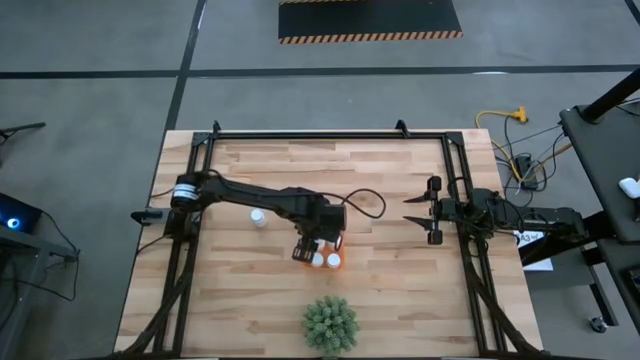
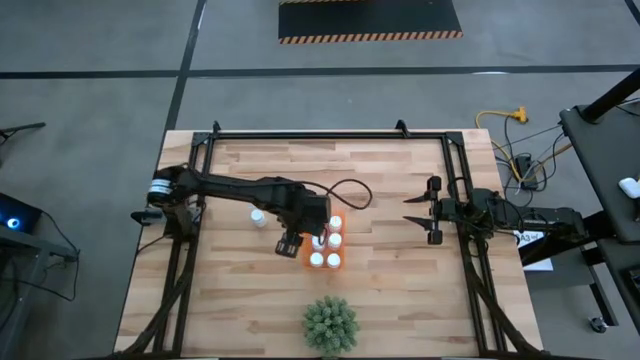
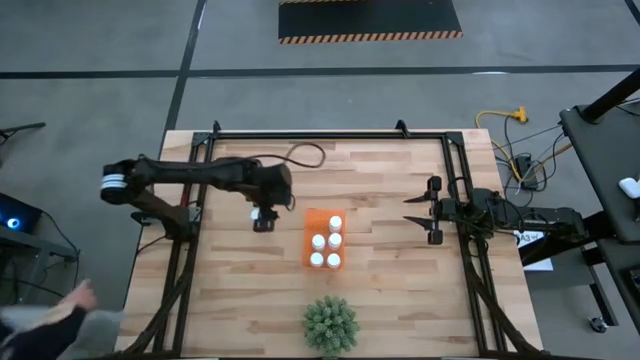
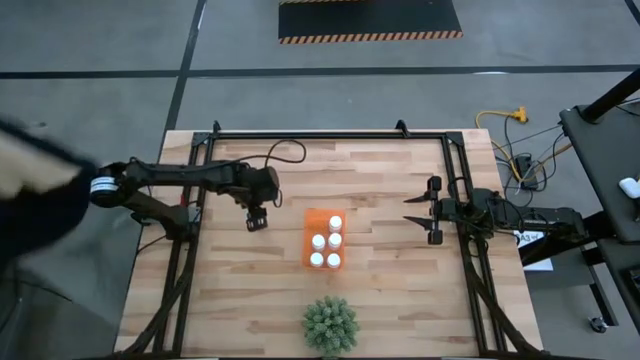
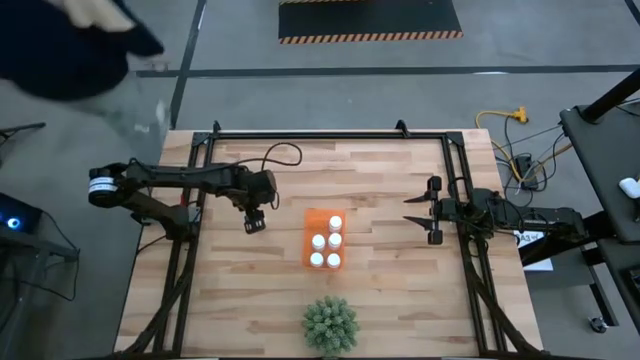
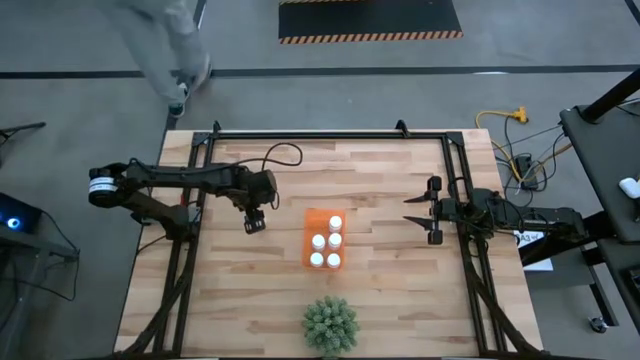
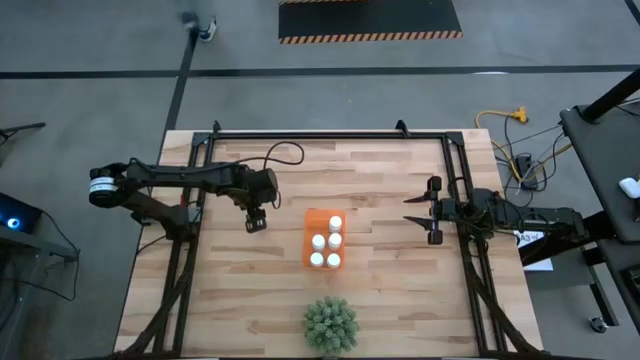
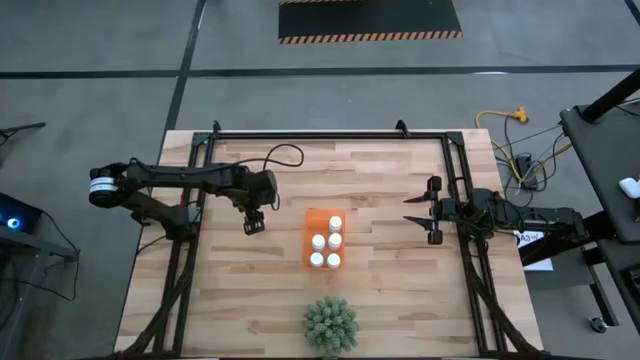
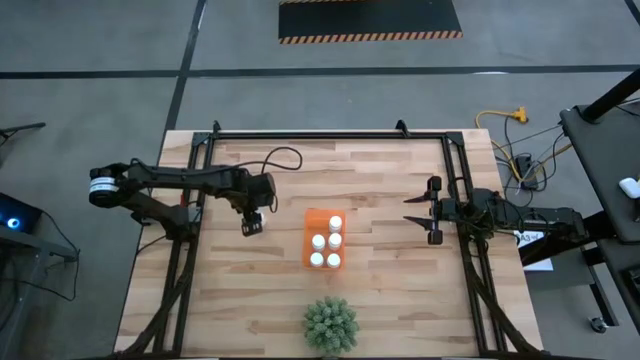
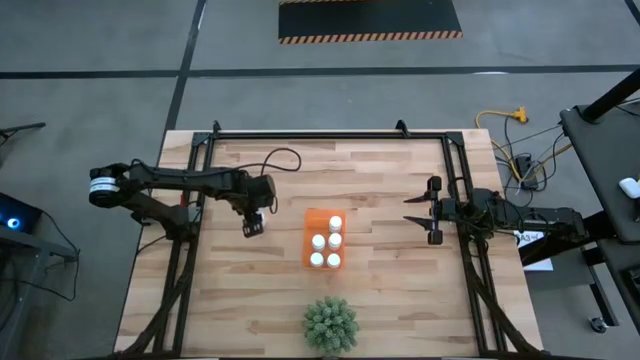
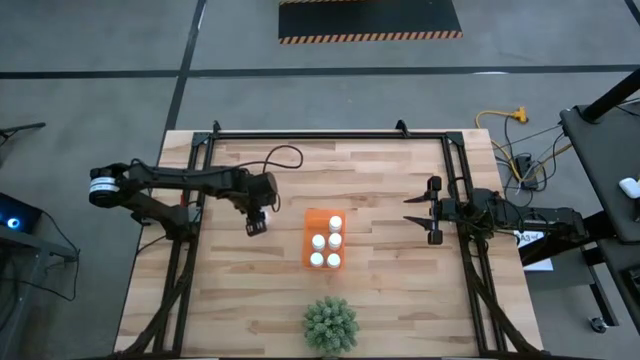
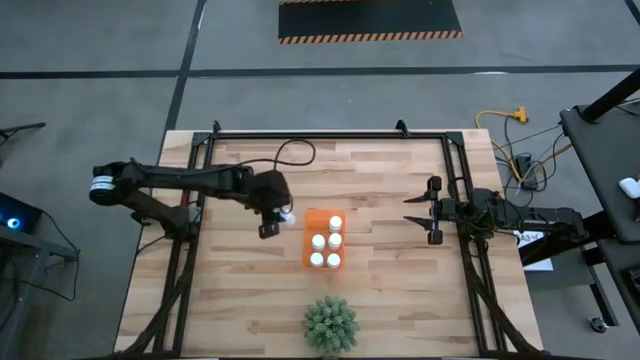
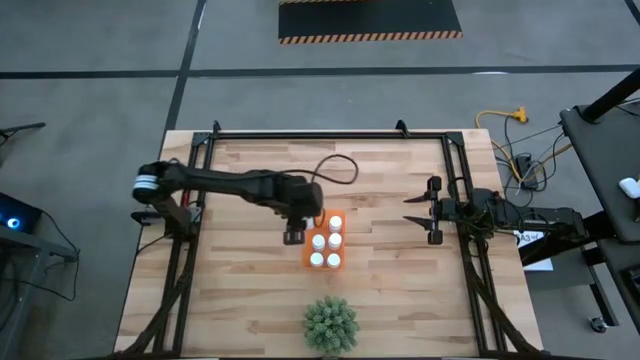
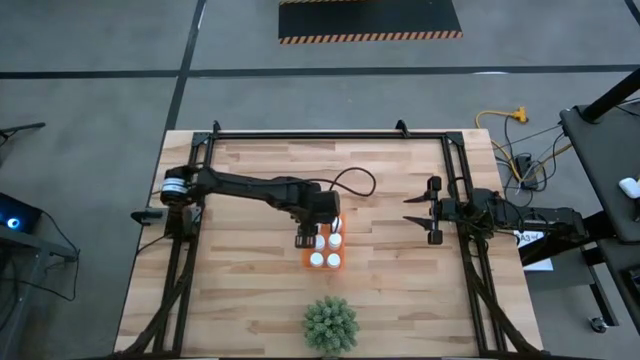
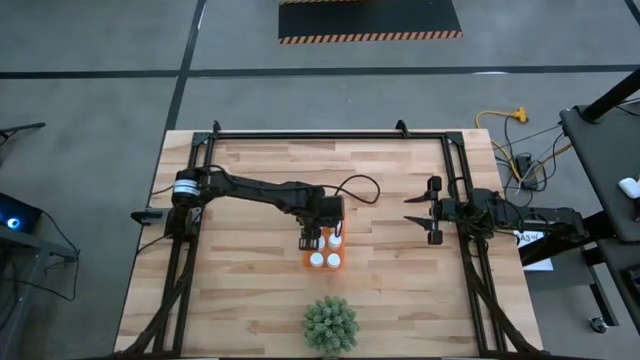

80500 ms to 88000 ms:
Task: Pick and place pill bottles into a basket
Put the white pill bottle into the orange bin

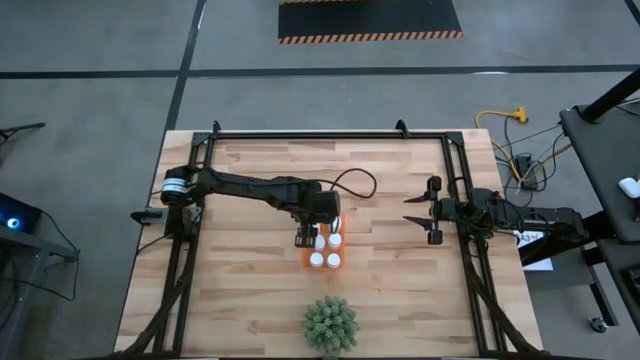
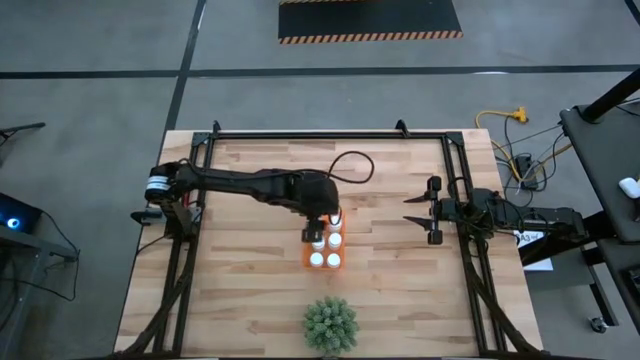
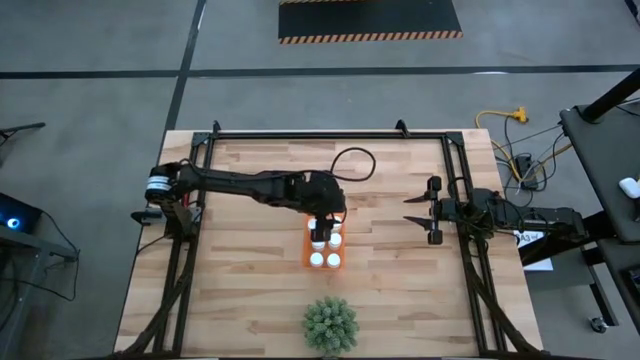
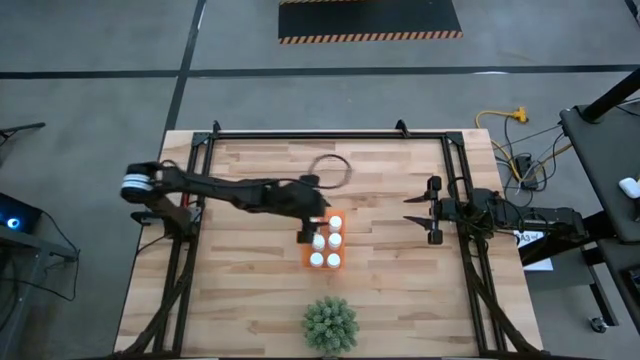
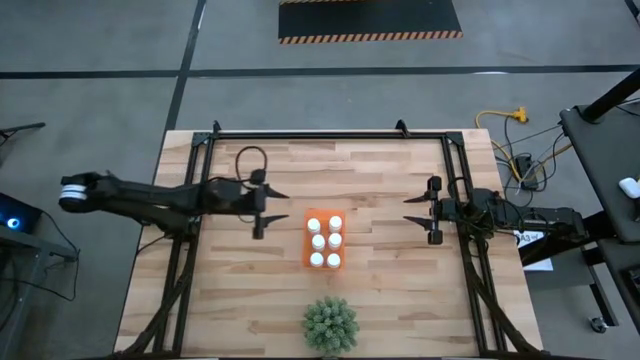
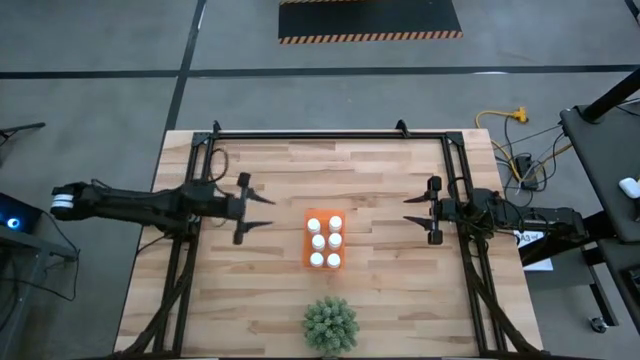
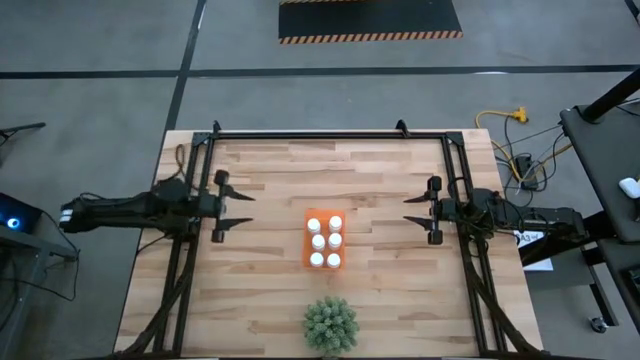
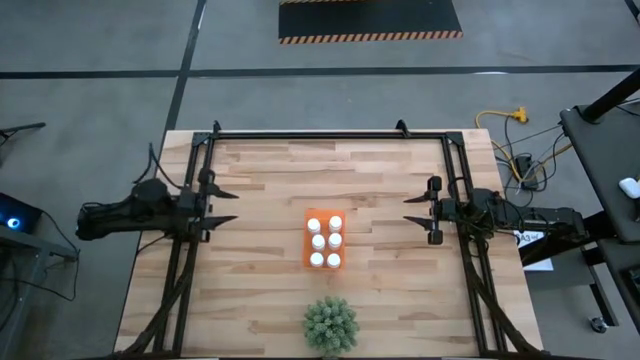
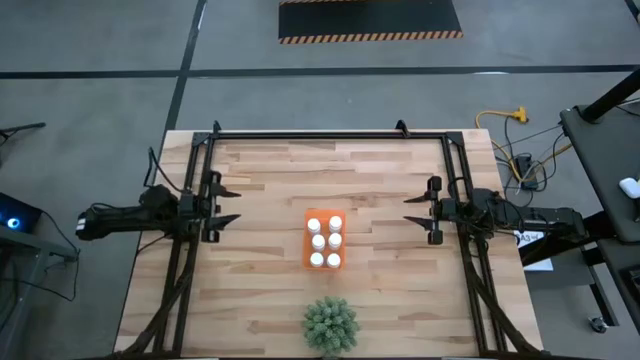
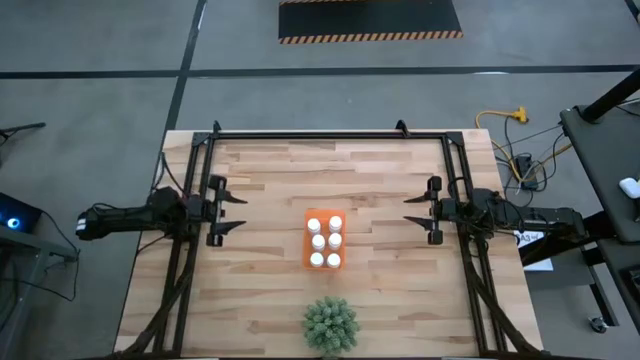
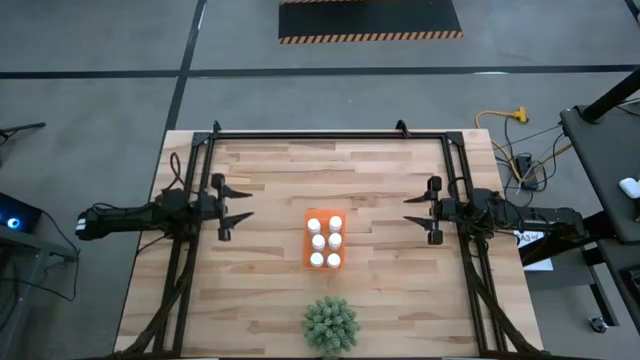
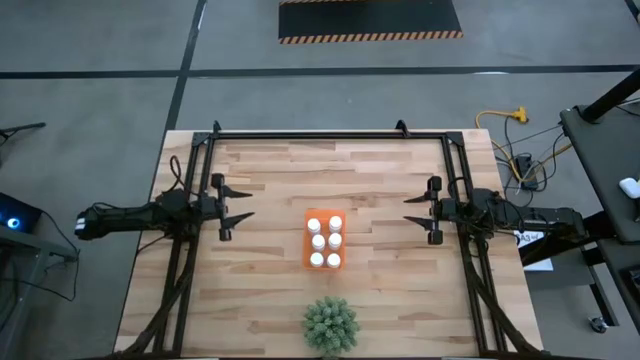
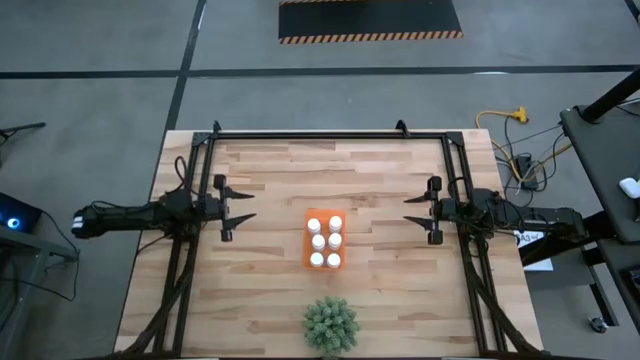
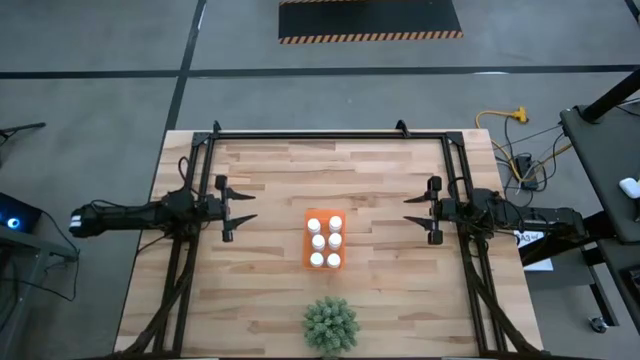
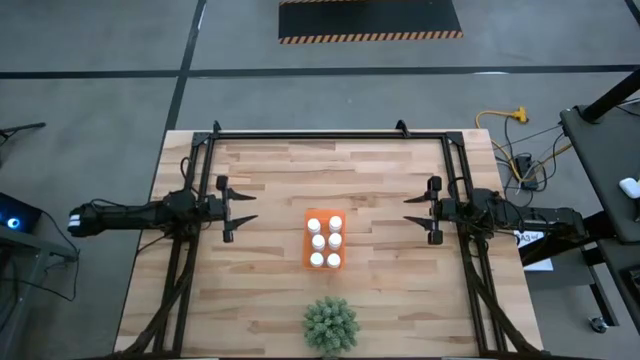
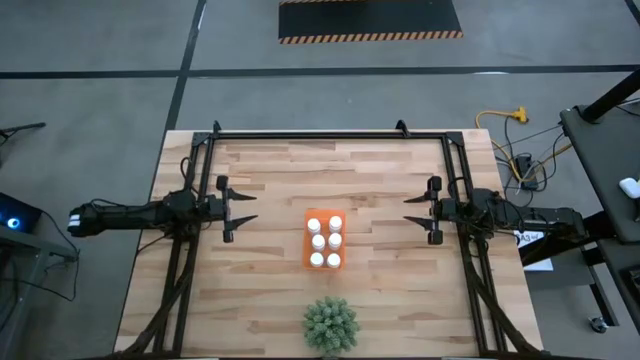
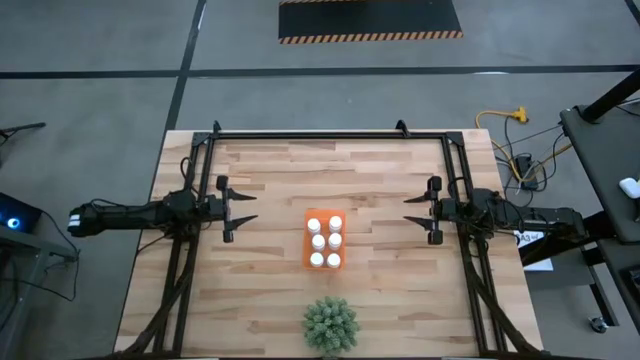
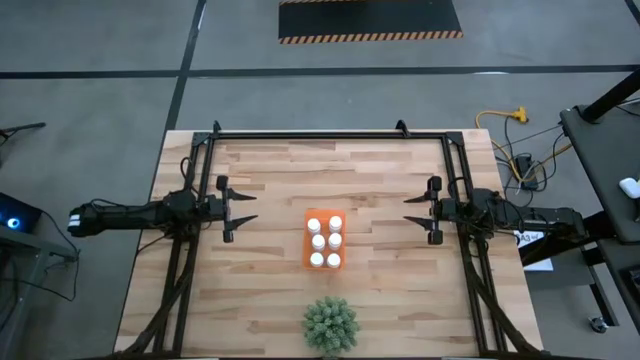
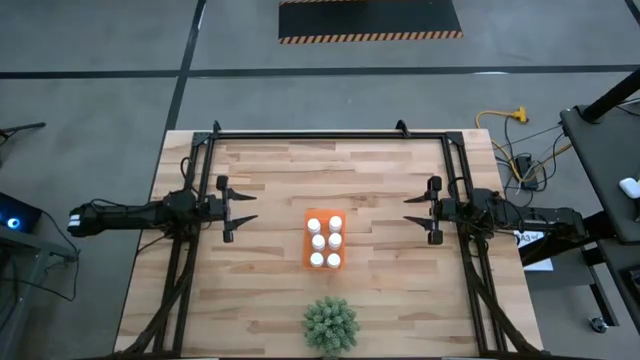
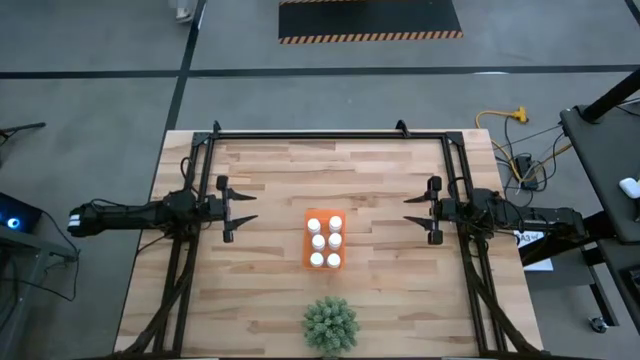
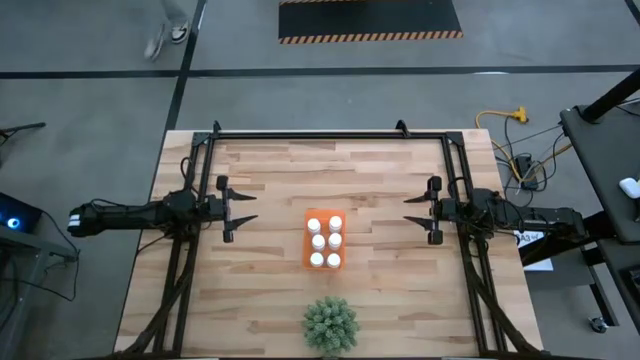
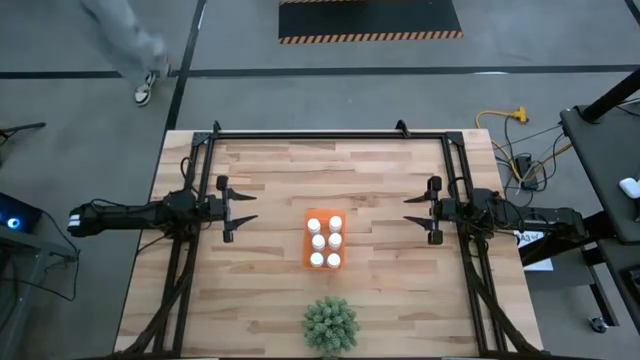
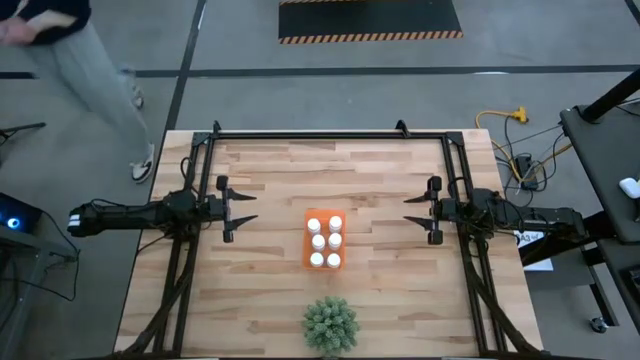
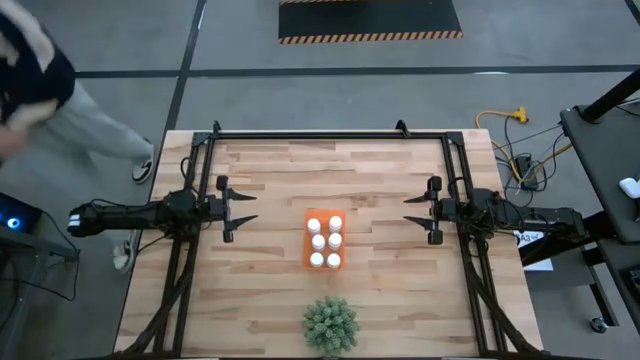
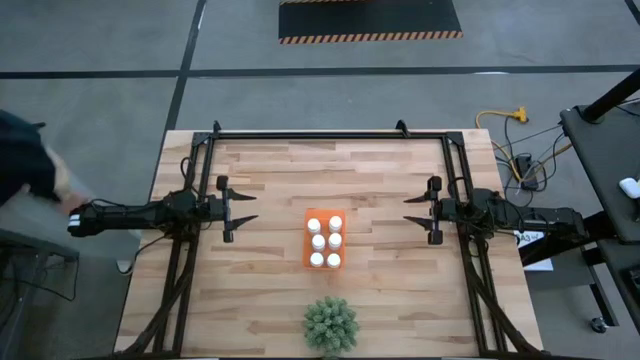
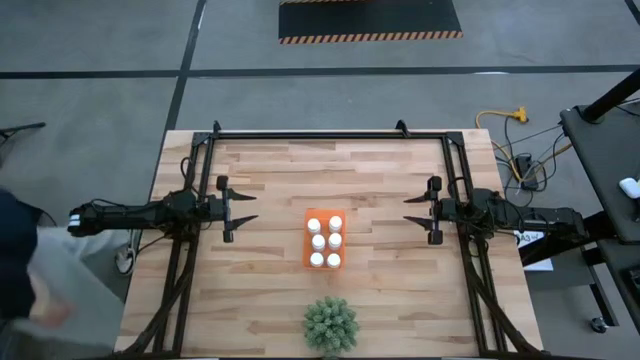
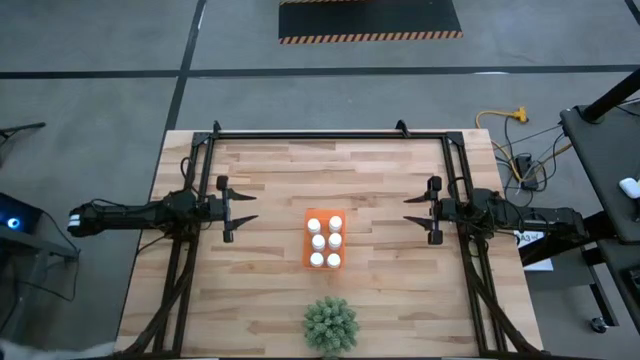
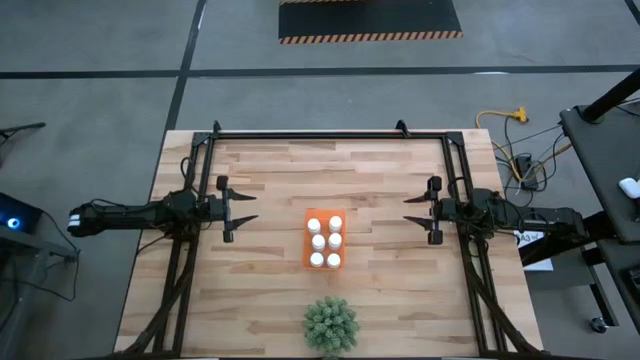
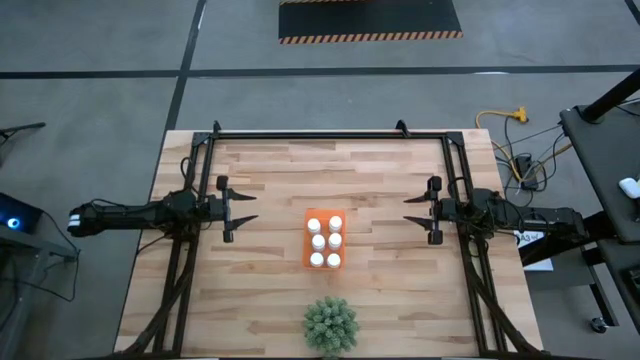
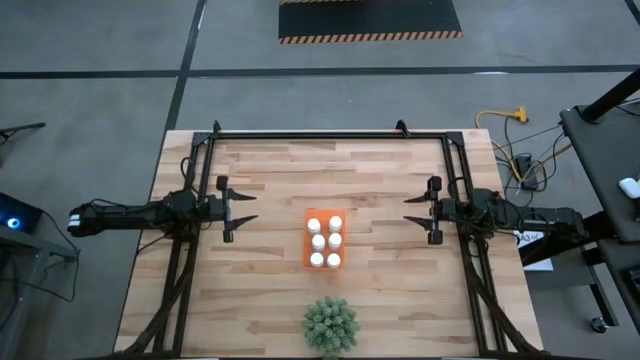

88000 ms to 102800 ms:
Return to Home Position
